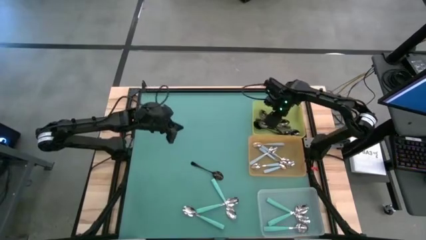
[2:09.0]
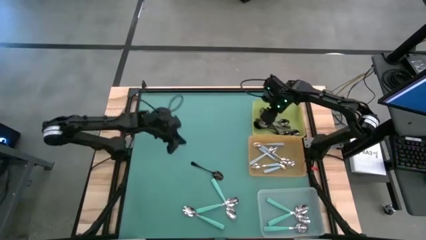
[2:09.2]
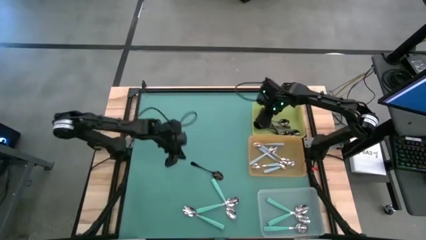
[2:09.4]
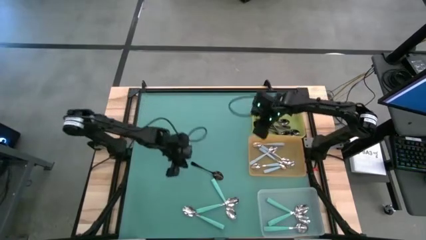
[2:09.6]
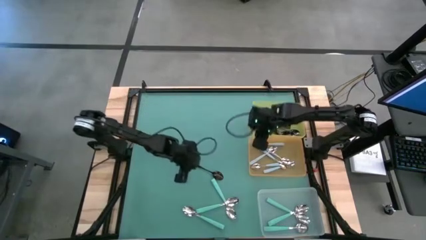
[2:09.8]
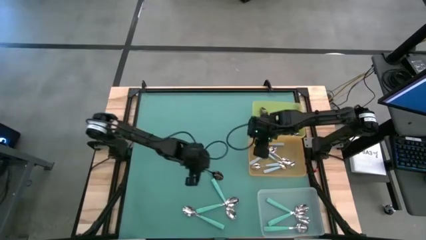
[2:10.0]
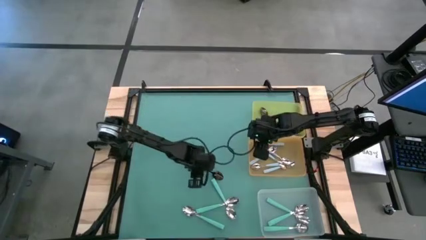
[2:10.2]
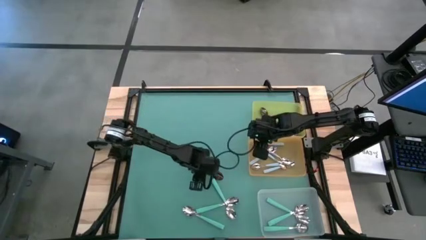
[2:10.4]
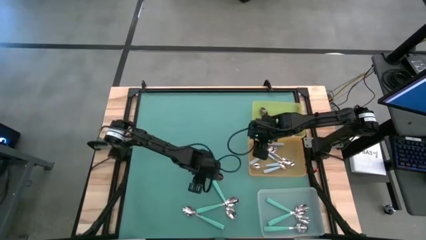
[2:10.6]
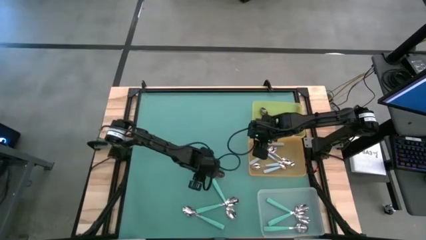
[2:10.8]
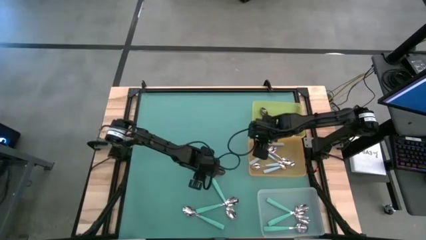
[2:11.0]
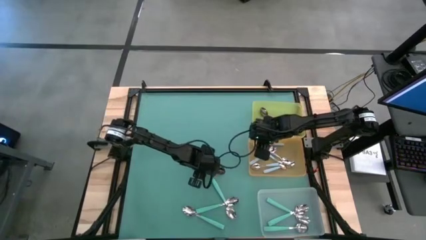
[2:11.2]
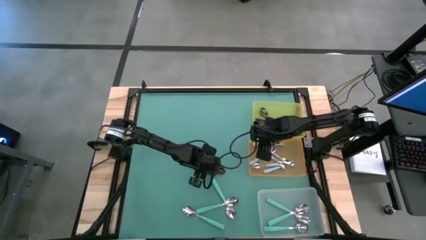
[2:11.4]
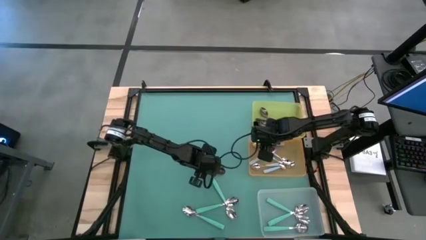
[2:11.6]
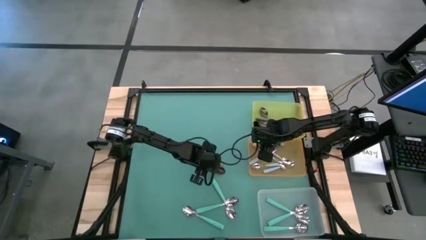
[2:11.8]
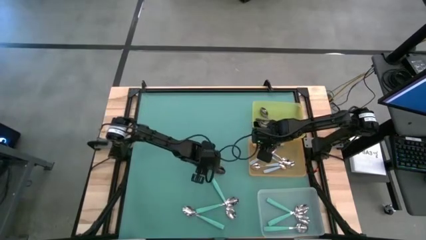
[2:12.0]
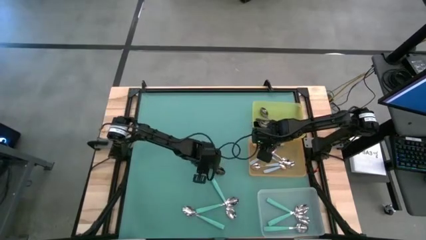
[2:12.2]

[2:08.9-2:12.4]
Task: Sort silverware by color (type)
Put the black spoon into the yellow bin

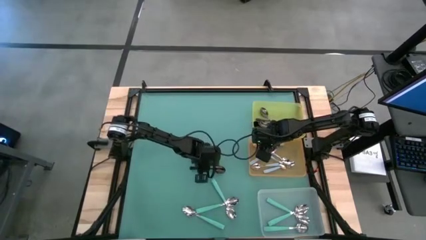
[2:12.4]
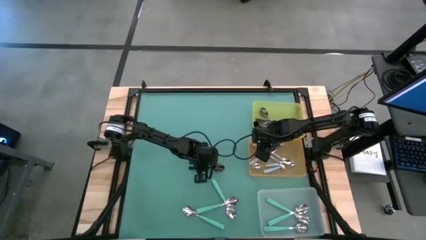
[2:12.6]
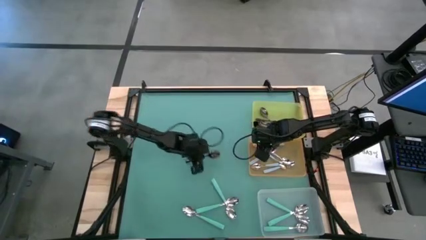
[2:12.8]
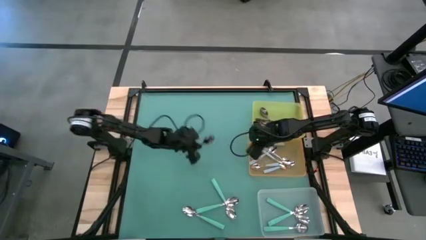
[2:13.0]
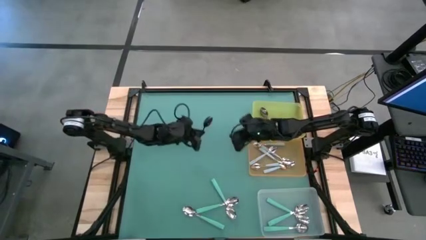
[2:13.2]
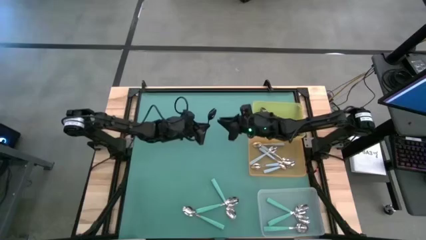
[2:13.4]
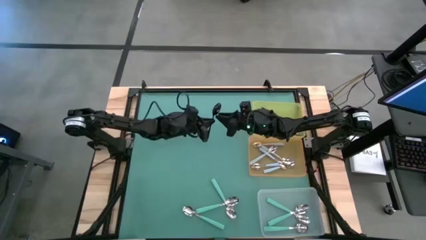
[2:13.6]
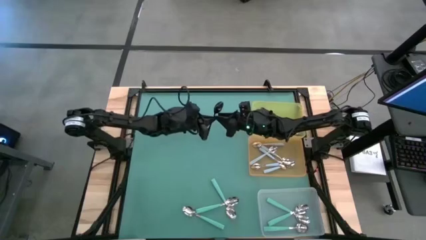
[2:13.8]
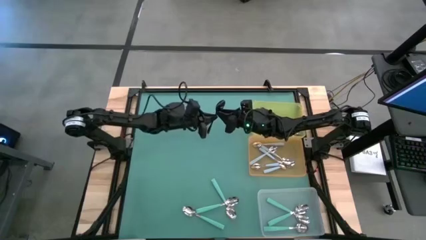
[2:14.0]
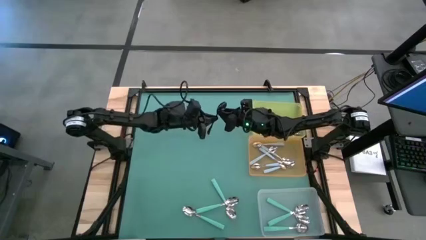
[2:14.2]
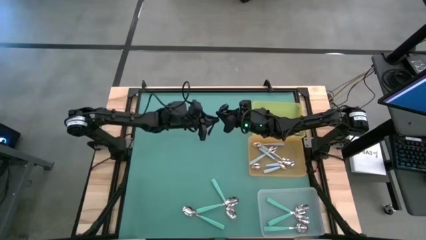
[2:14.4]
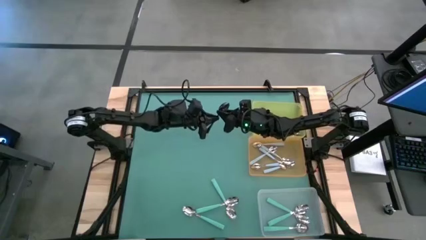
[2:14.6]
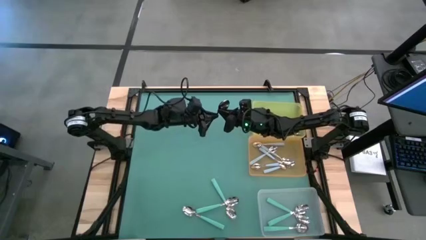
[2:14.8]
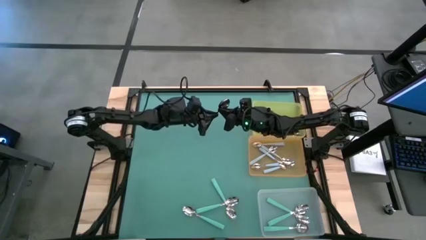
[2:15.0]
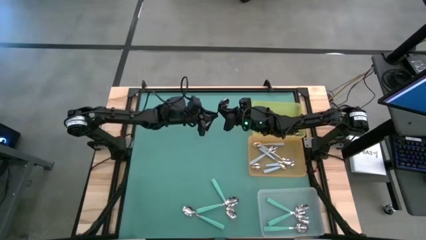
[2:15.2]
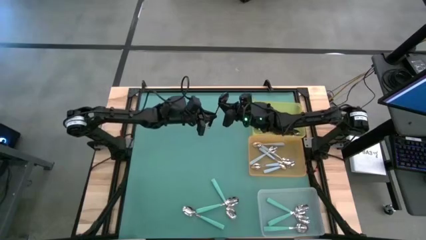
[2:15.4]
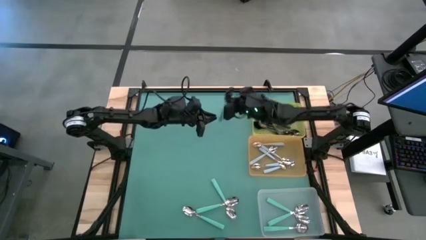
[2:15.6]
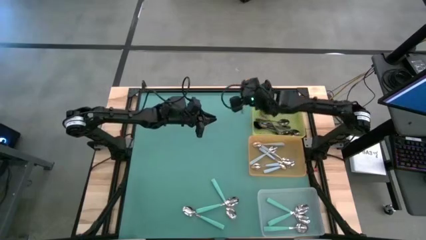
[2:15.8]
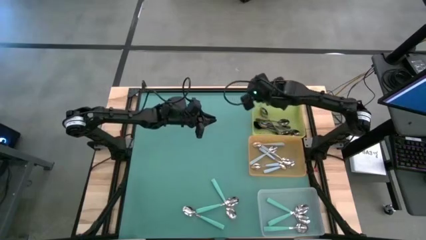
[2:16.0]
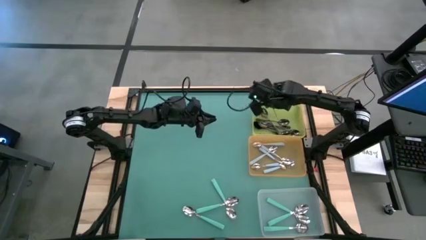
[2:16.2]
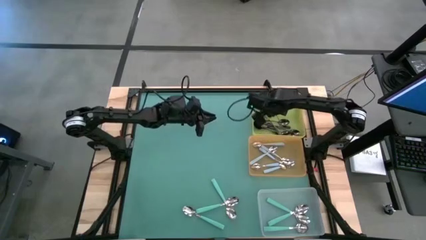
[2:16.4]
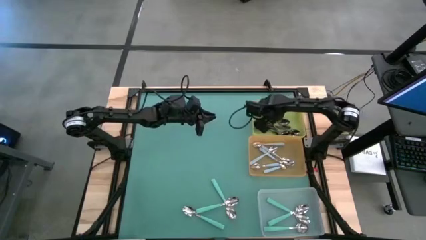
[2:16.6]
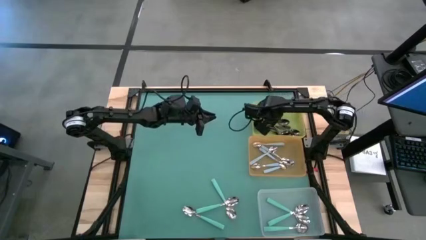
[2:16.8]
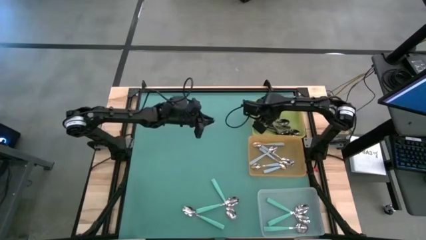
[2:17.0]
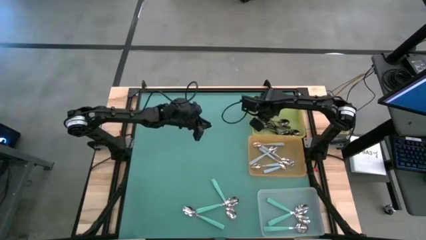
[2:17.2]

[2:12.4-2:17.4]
Put the black spoon into the yellow bin

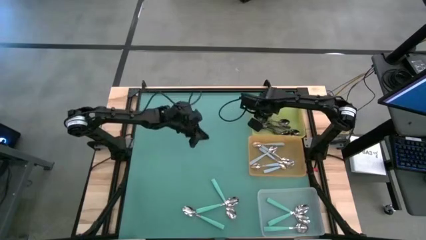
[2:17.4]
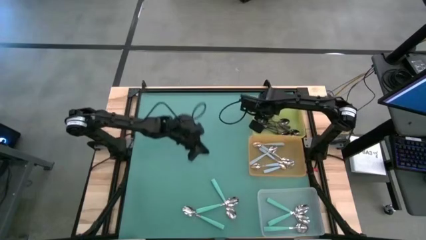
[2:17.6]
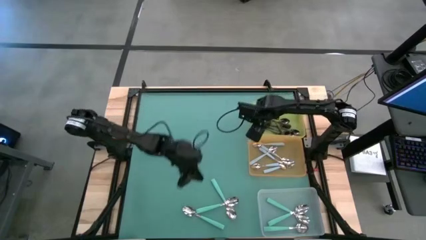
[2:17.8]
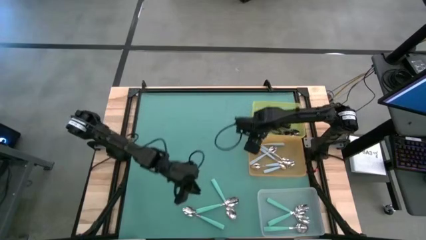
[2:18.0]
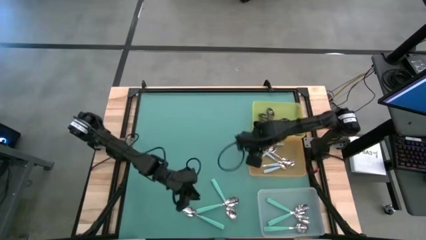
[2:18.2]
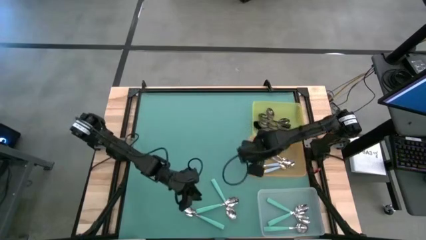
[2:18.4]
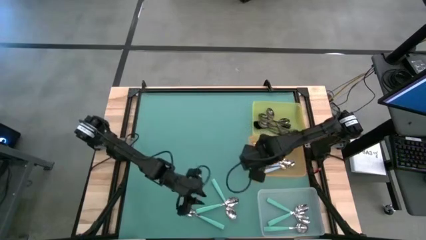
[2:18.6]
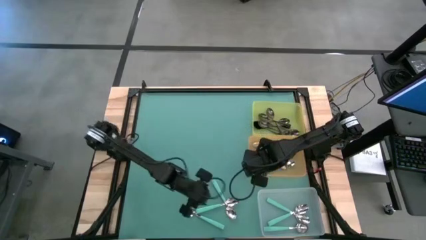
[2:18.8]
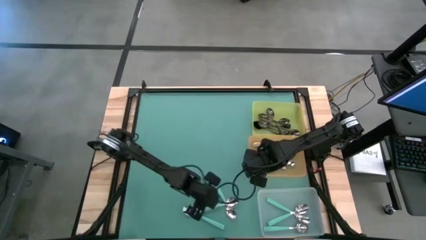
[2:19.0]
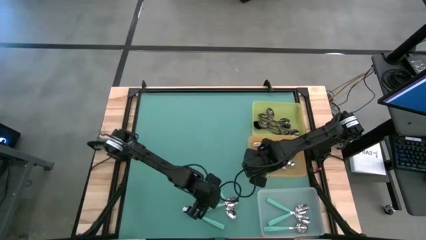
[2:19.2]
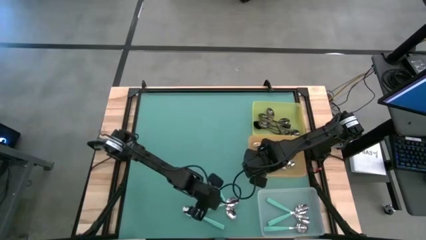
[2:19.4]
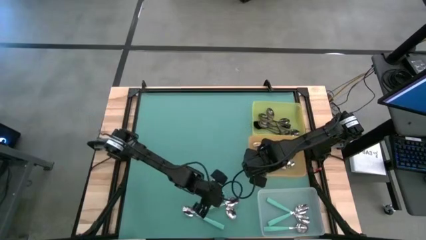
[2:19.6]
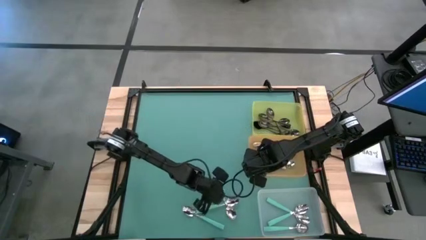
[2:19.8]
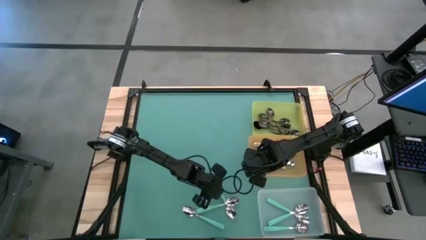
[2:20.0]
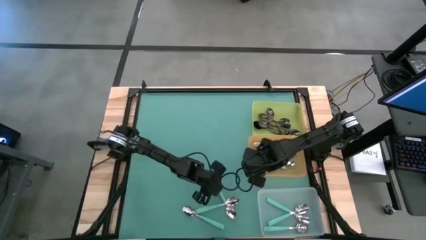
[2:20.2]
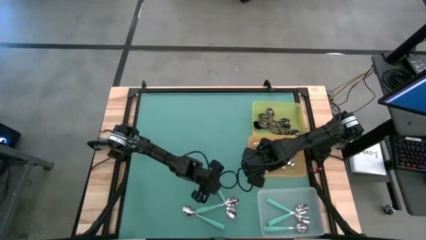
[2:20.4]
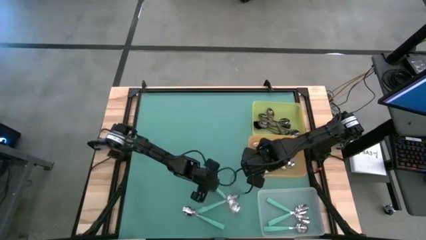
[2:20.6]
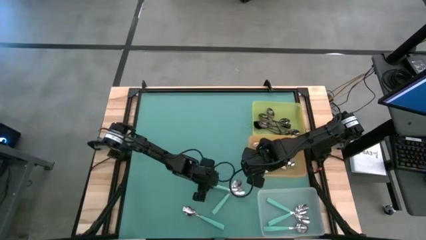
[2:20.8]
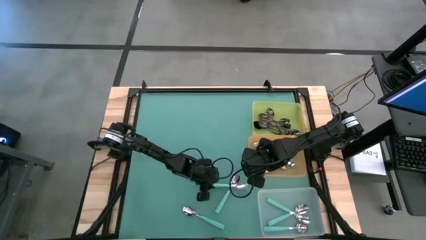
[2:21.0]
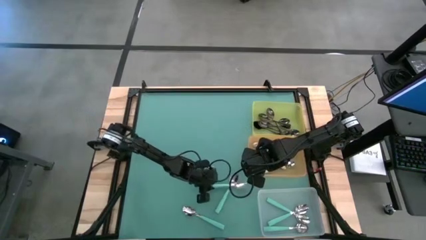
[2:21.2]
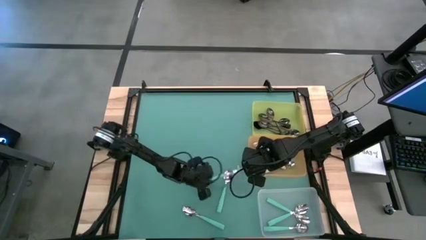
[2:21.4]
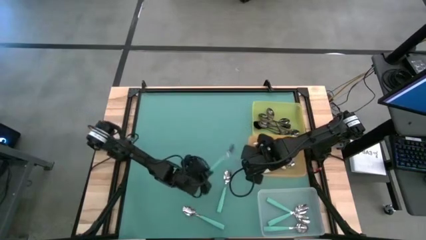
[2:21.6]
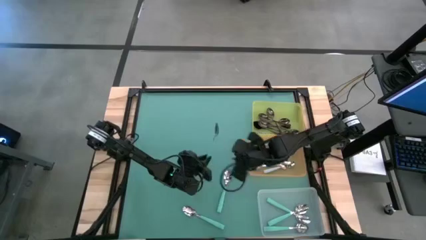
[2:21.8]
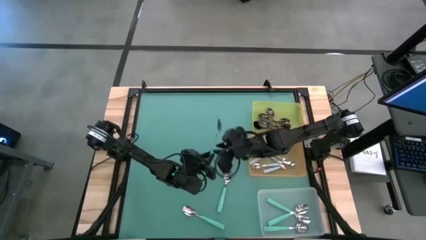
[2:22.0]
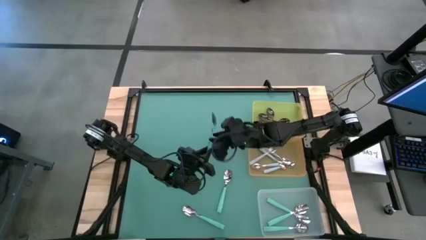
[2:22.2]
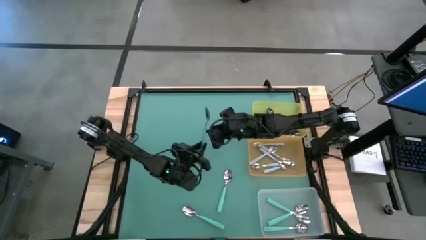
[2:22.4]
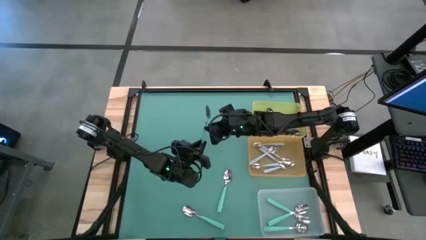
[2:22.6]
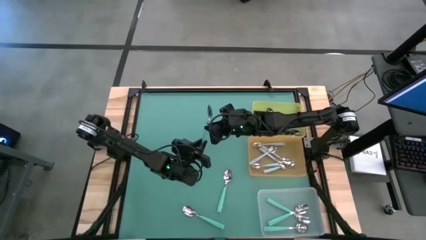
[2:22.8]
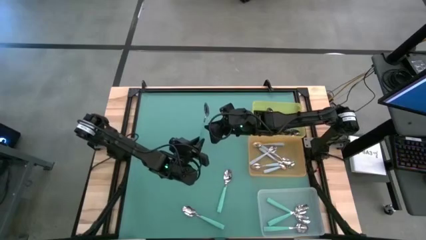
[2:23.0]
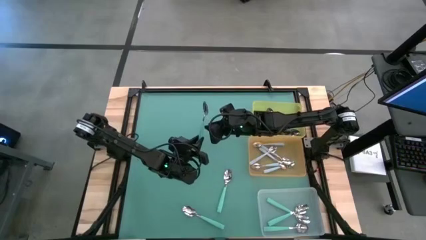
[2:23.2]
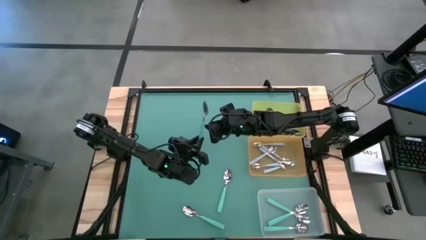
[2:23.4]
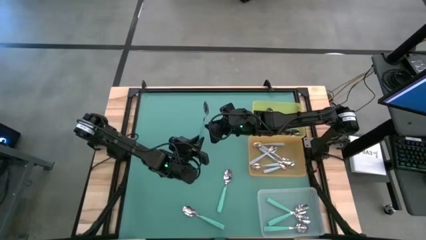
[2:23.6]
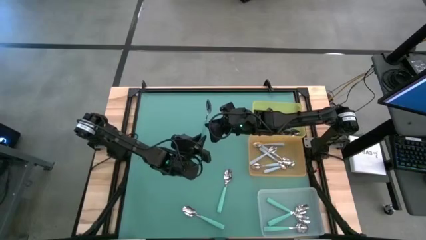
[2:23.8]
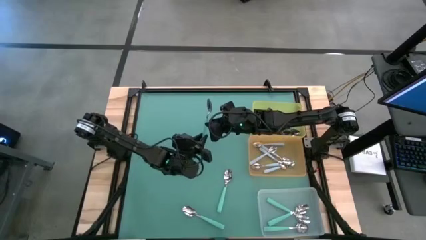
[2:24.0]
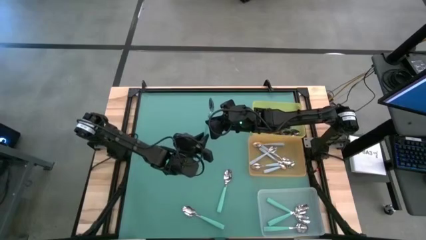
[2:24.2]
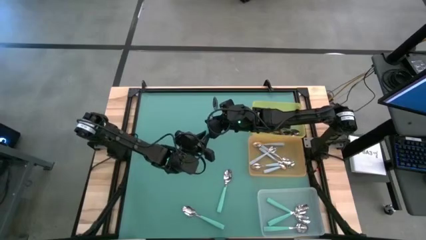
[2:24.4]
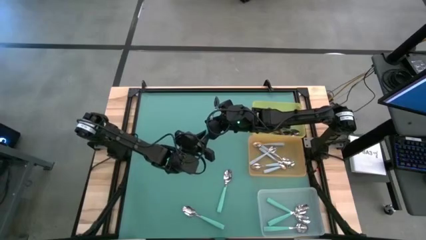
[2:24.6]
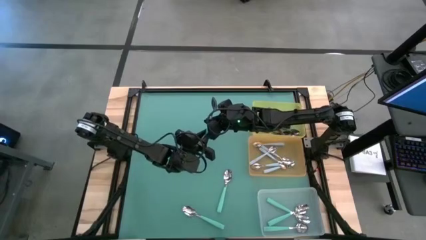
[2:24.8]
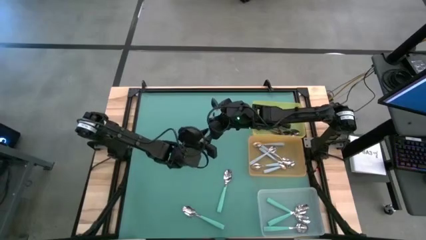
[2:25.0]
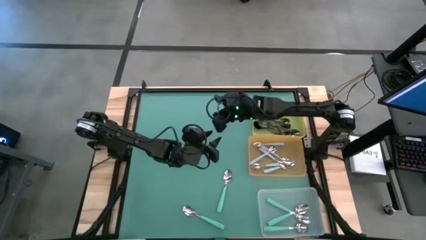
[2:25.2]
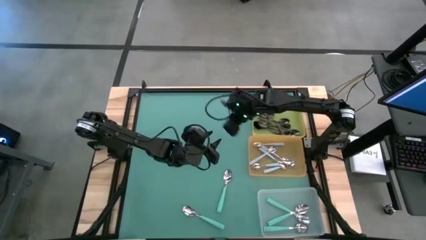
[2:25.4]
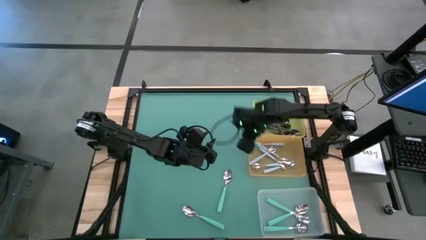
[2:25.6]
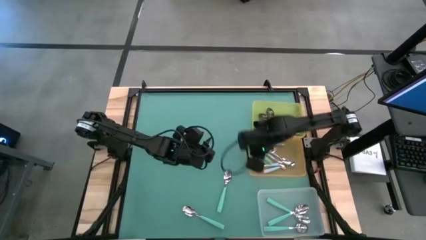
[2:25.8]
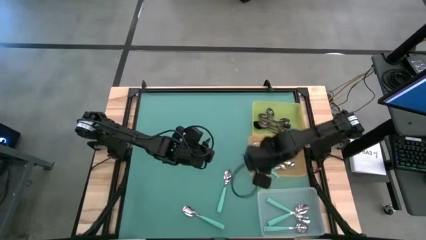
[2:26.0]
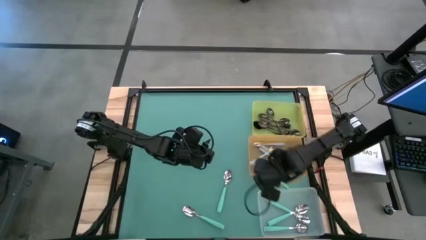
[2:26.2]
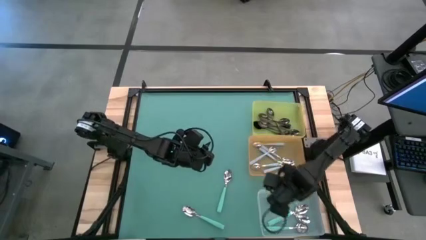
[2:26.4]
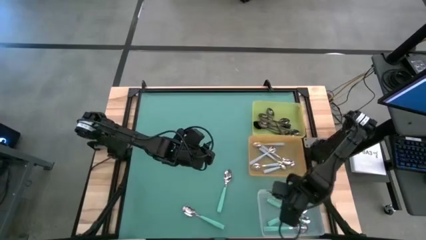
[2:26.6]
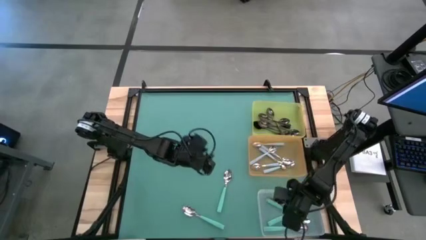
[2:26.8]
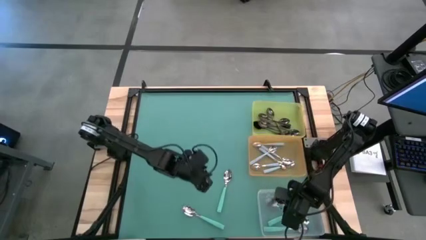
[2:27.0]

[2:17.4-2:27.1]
Put the green spoon into the transparent bin
